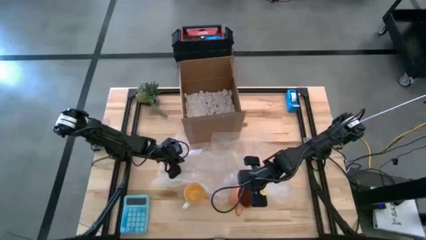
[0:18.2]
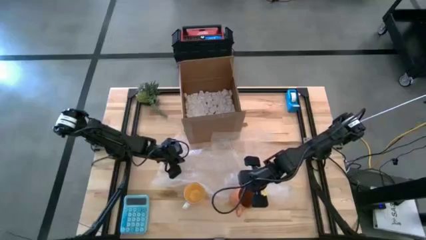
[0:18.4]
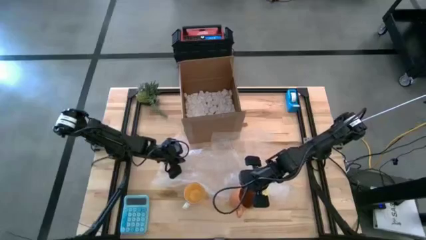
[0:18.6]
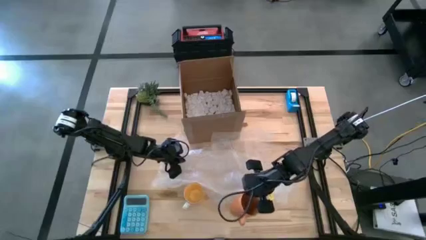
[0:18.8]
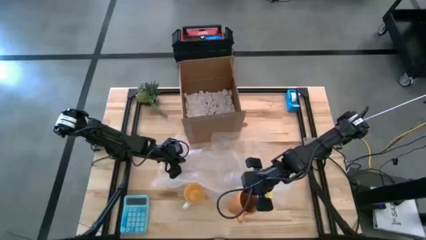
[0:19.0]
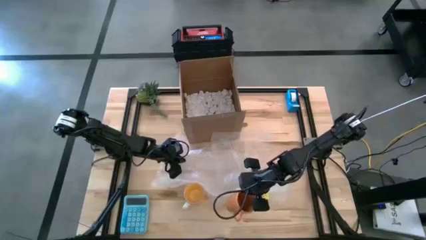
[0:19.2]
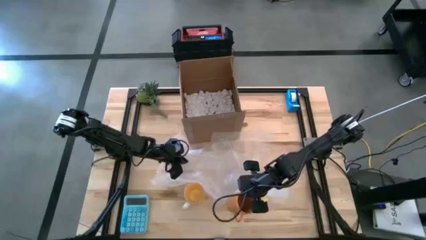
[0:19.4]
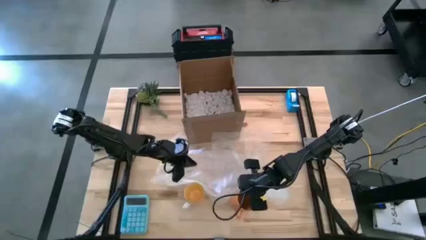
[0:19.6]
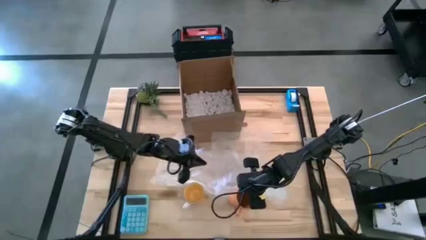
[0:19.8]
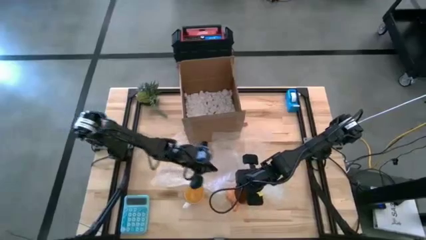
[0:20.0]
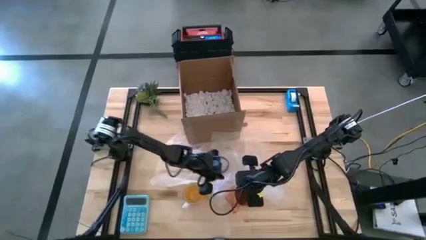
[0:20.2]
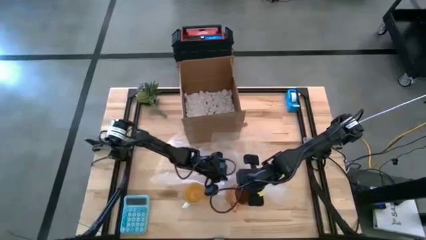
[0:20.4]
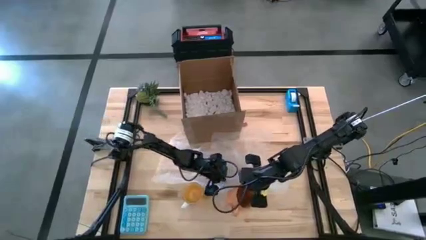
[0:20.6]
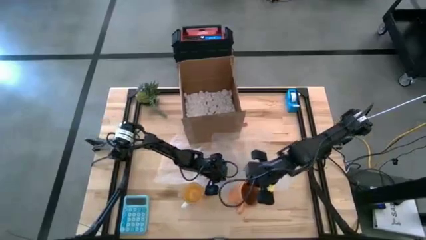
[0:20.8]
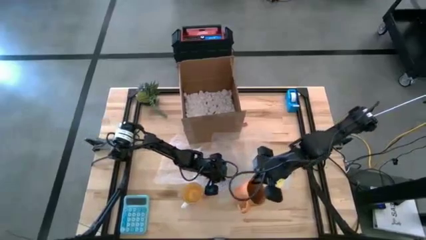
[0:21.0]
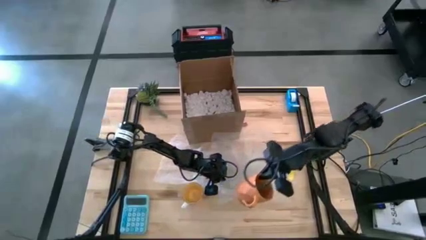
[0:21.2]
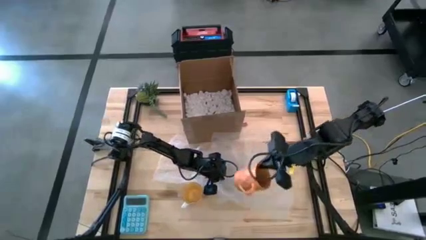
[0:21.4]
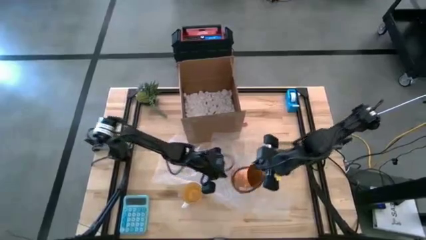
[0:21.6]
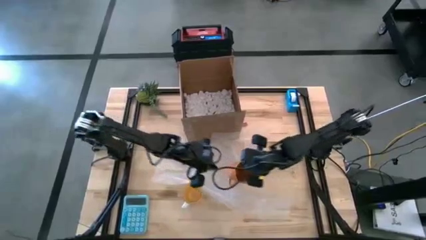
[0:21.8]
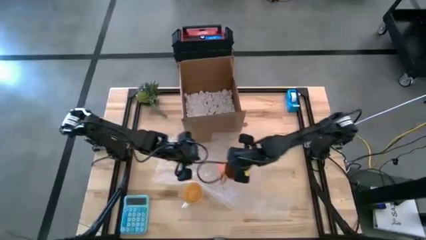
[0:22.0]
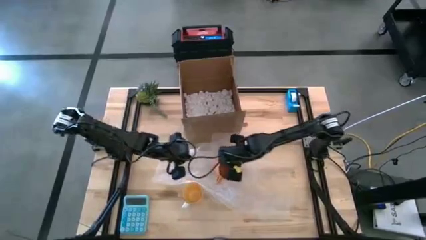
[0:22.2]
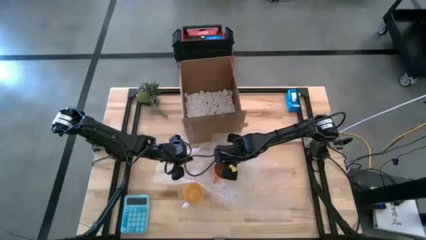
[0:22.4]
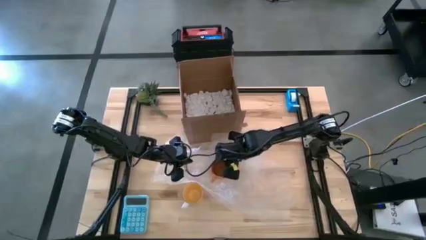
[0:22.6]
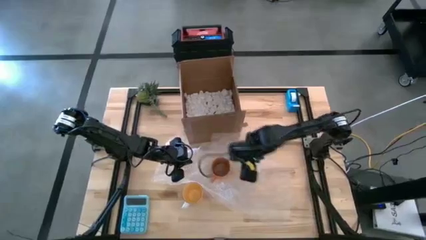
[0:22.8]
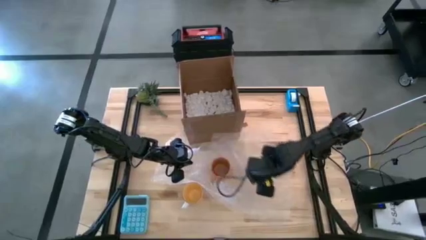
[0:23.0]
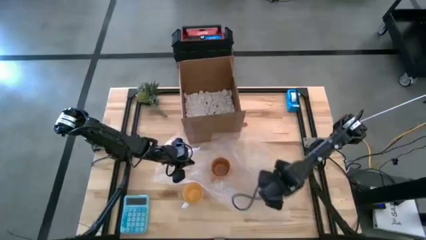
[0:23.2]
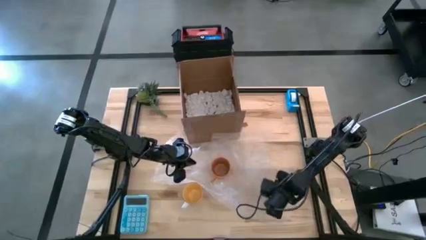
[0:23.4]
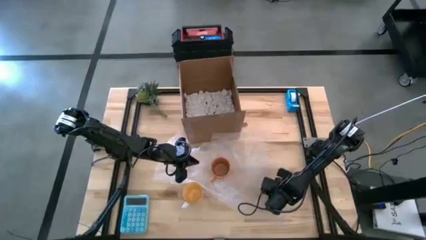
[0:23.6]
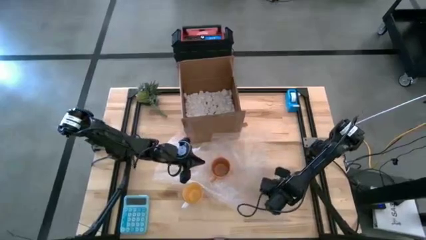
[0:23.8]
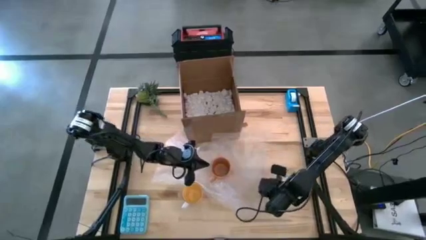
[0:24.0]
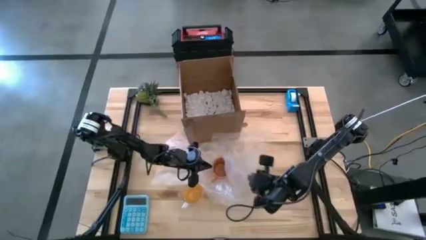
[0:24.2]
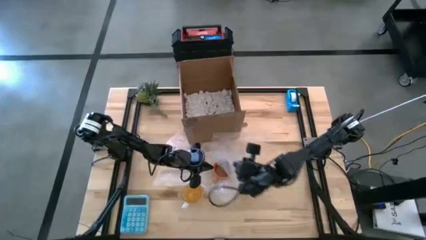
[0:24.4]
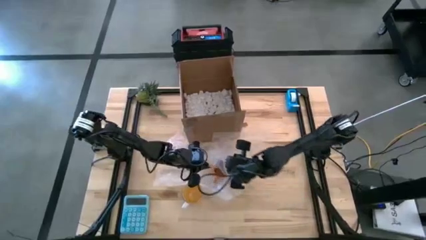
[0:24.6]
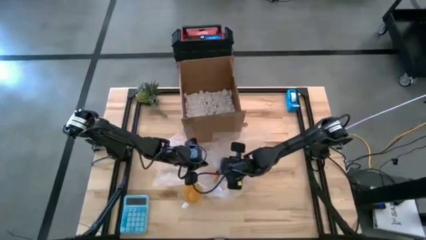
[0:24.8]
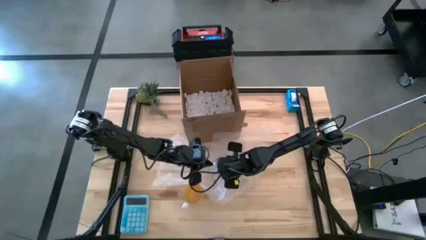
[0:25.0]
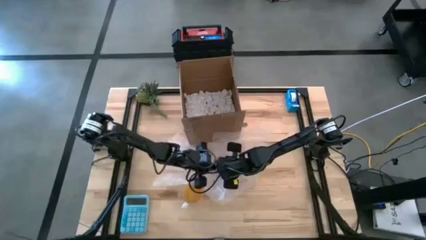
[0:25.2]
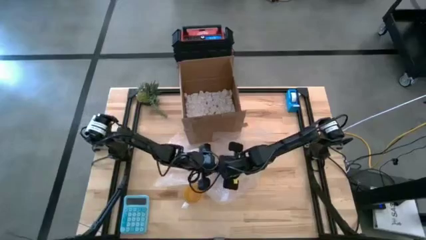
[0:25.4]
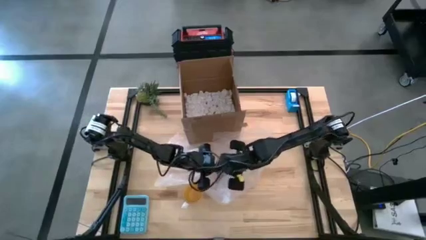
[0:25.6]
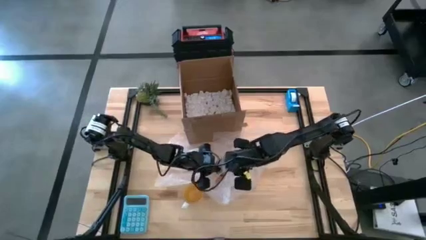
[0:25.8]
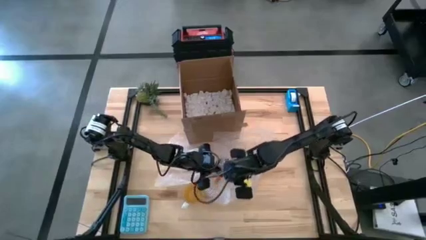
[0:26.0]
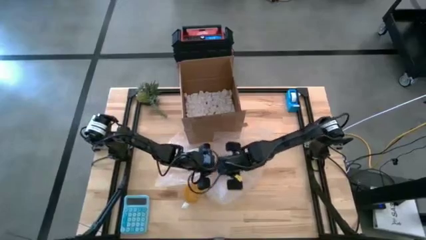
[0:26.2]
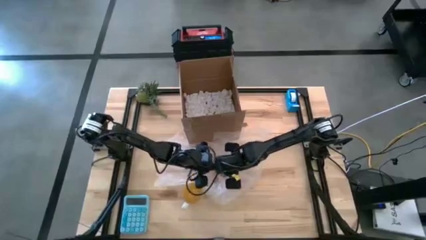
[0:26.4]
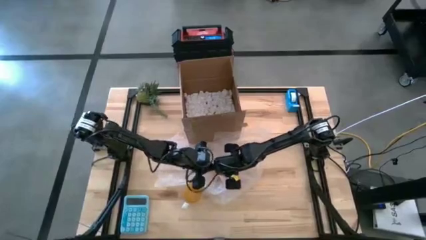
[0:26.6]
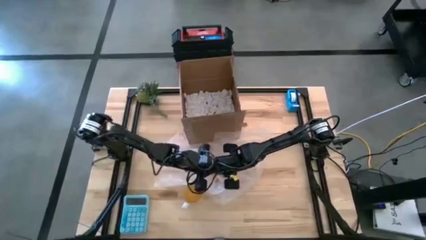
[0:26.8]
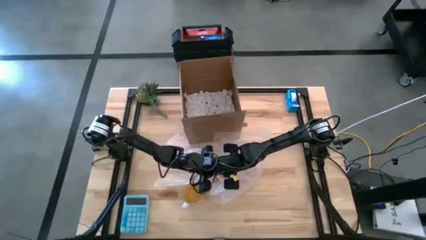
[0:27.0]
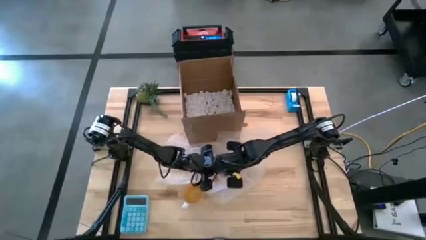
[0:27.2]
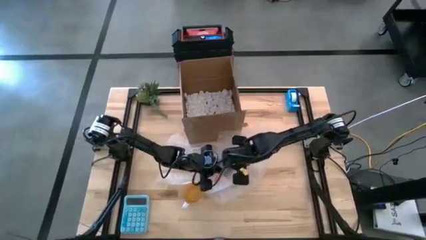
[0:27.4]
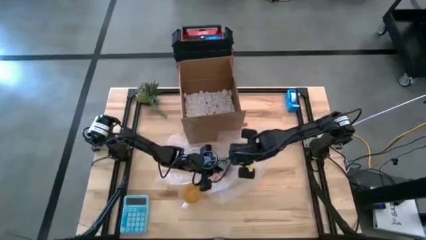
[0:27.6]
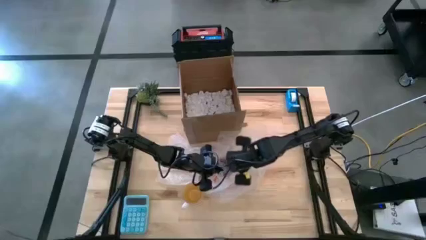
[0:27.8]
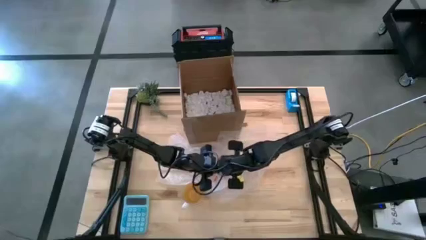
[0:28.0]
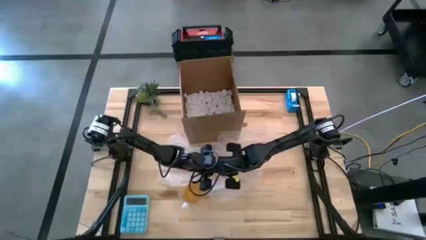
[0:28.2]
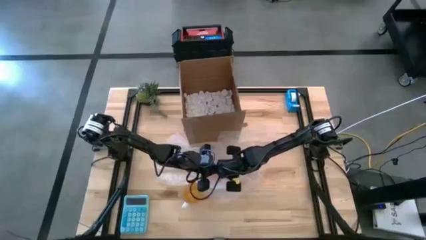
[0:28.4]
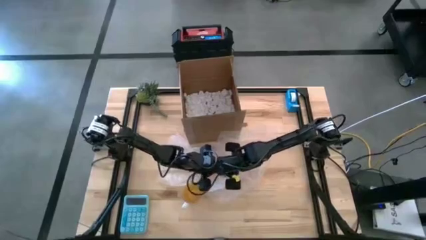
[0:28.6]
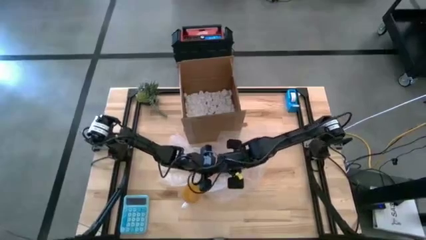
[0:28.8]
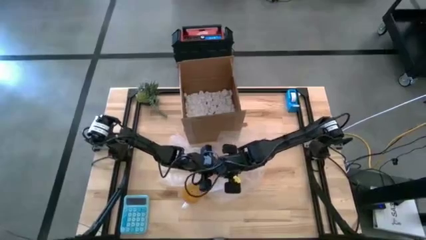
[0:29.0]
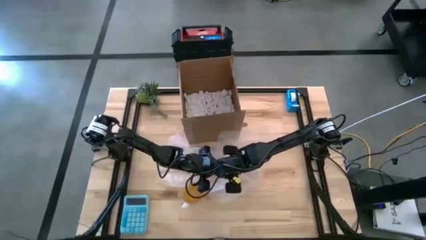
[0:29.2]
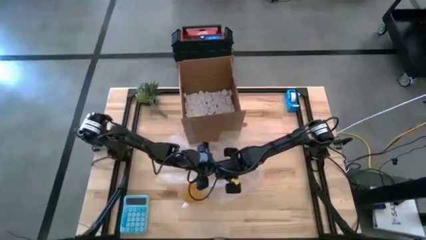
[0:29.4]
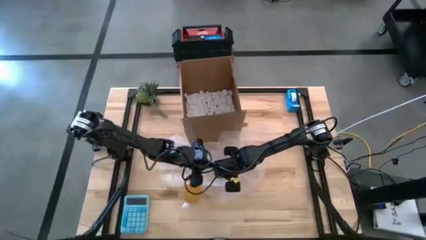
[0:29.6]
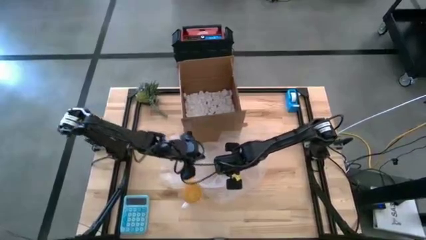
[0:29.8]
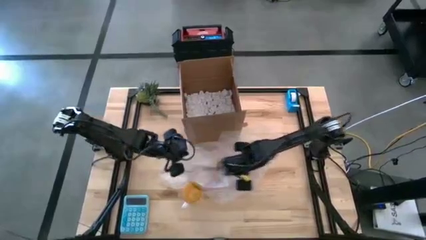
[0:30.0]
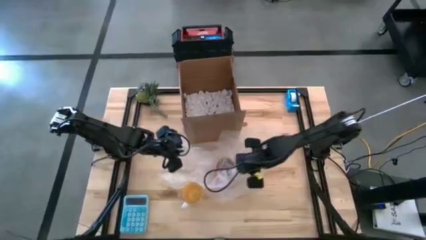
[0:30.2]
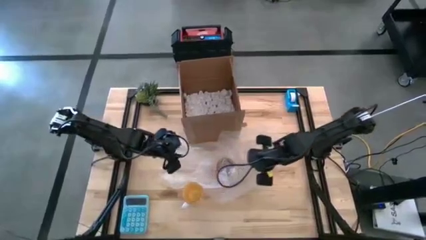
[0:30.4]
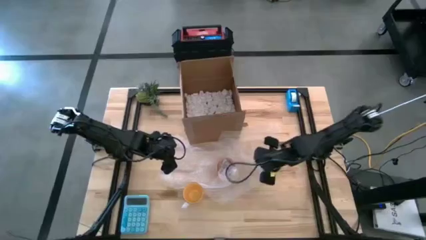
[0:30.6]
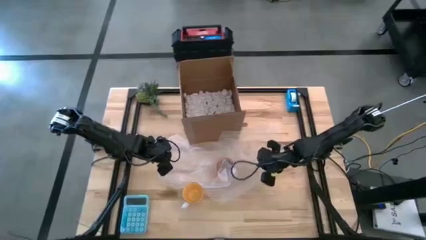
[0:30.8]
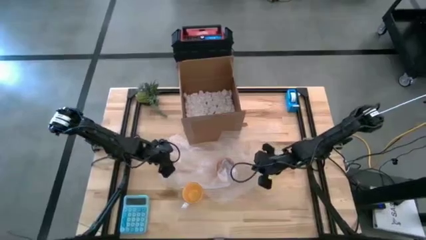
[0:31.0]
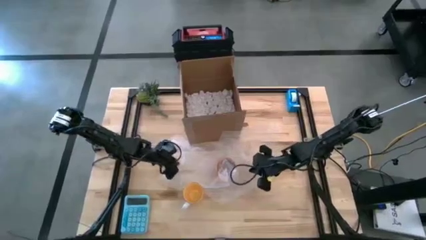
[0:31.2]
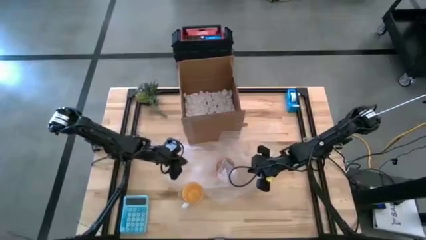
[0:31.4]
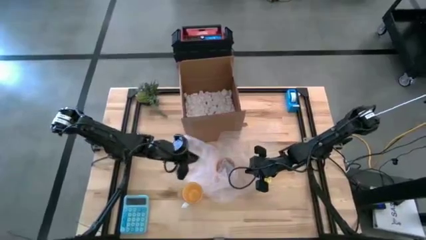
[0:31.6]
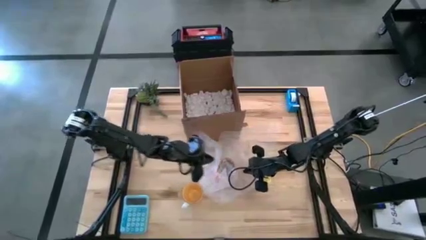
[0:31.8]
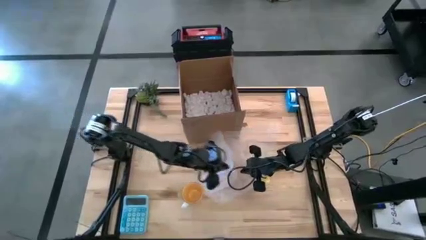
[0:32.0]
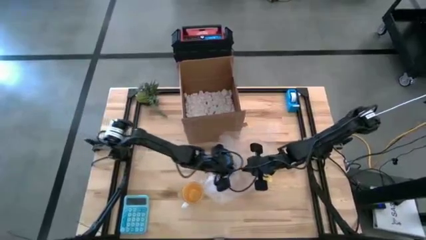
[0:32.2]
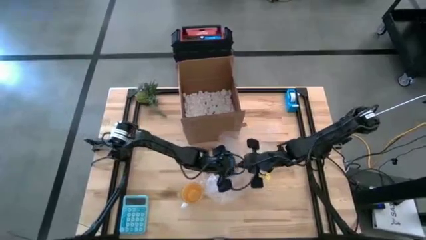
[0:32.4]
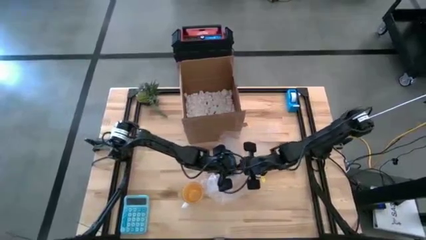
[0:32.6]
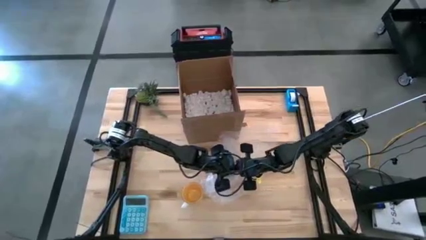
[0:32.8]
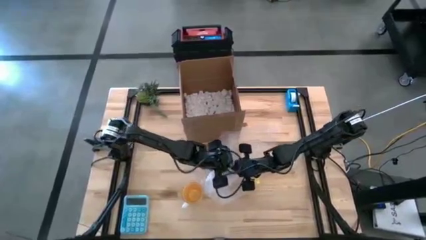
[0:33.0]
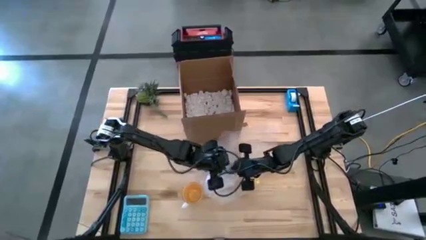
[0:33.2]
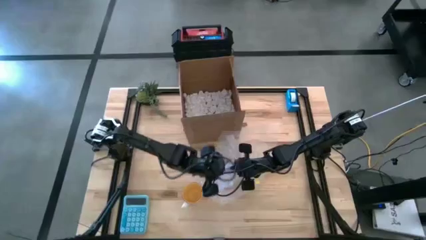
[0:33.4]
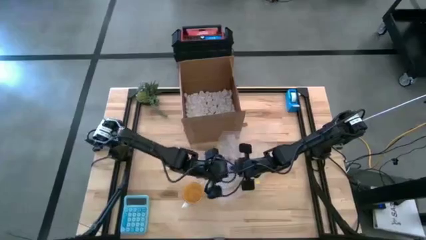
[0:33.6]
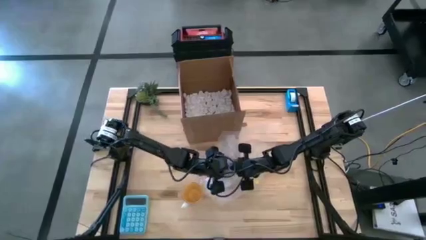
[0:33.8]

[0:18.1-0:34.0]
Task: wrap mug
Wrap the orange mug with bubble wrap
